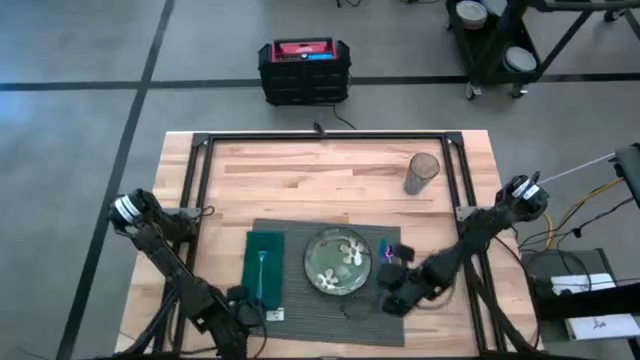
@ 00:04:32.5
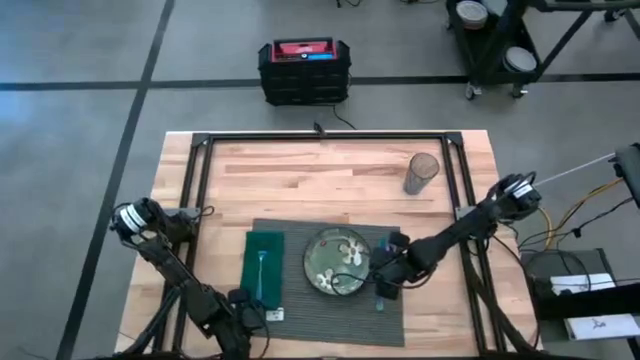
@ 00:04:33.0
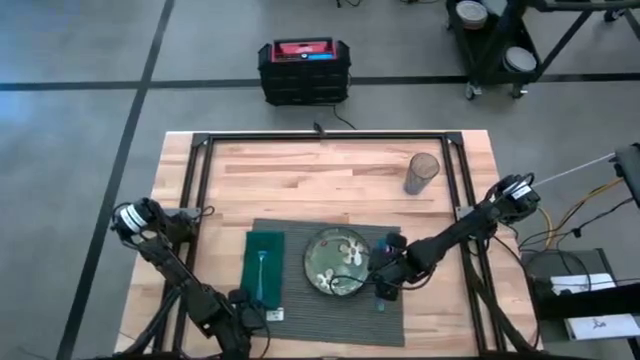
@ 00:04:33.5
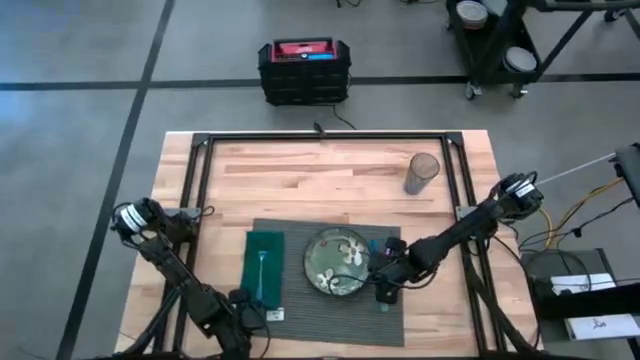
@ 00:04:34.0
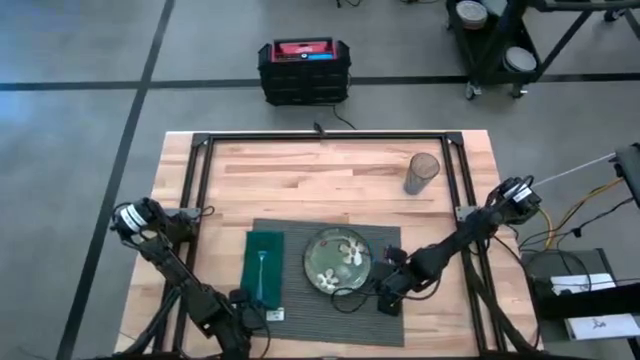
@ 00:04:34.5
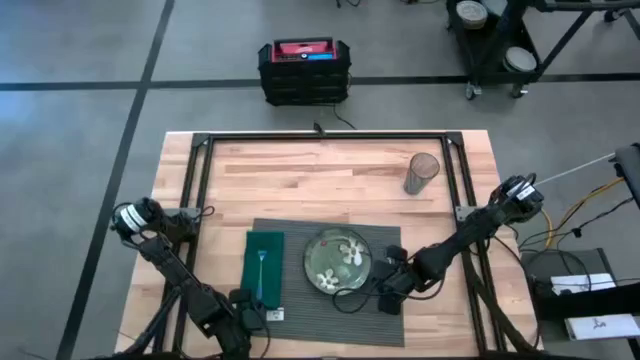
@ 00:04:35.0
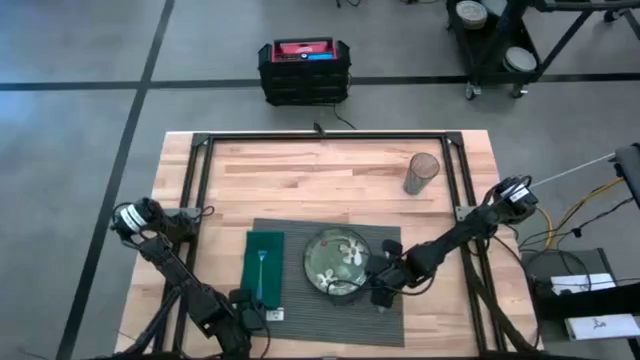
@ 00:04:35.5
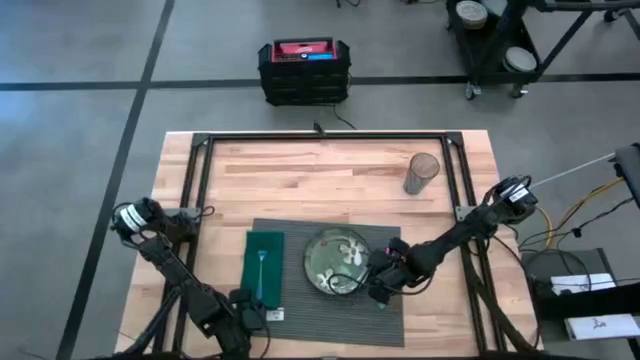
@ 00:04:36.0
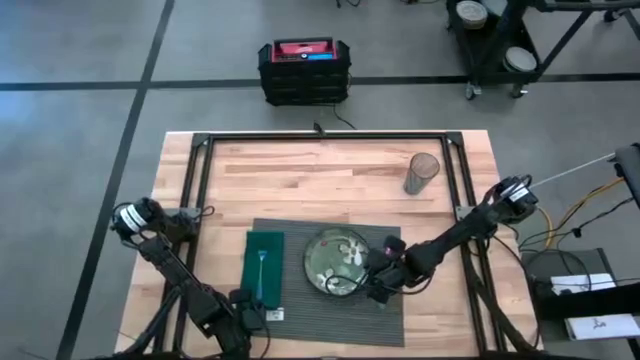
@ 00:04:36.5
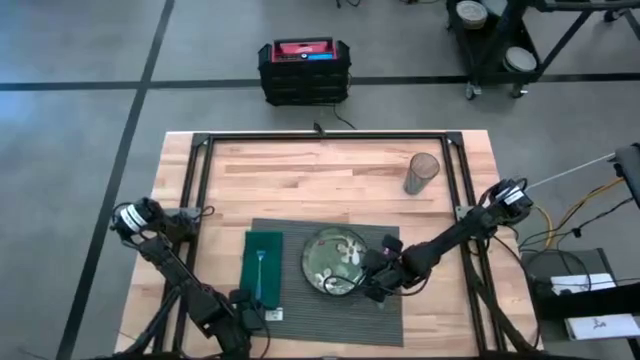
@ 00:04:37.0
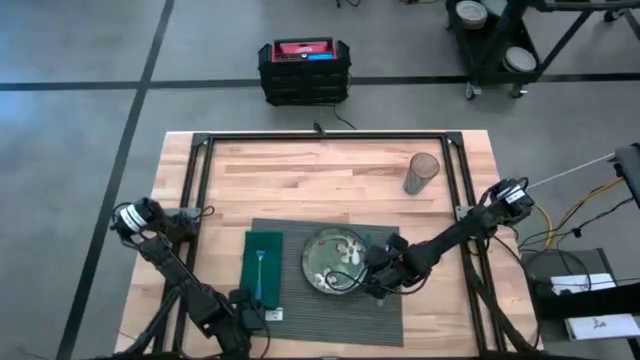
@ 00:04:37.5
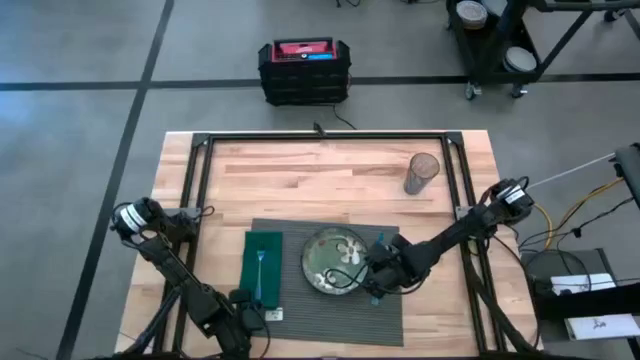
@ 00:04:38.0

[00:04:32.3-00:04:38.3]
Task: Set table place
Adjust the iridescent blue knife

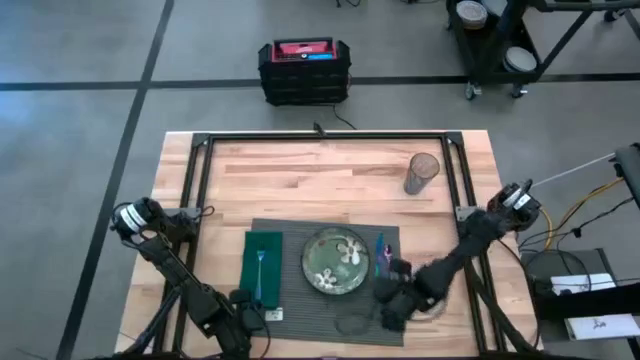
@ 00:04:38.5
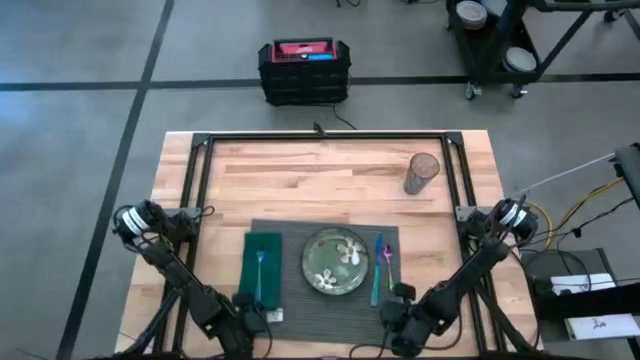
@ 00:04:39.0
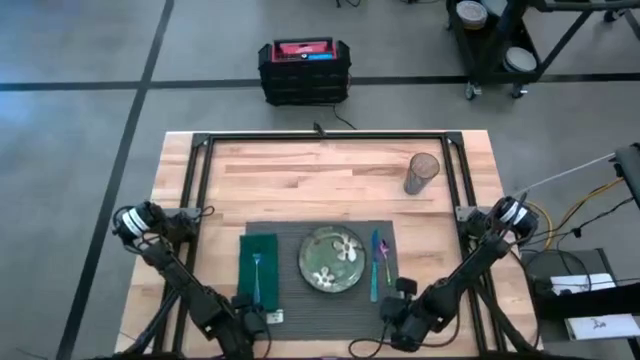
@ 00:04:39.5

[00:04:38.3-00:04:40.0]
Adjust the gray place mat

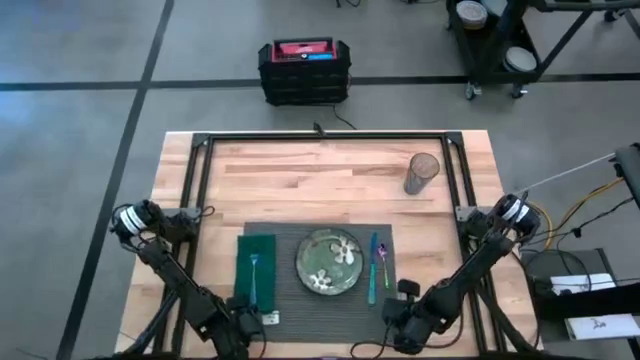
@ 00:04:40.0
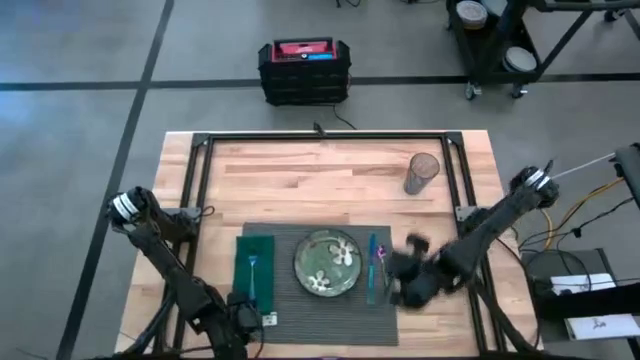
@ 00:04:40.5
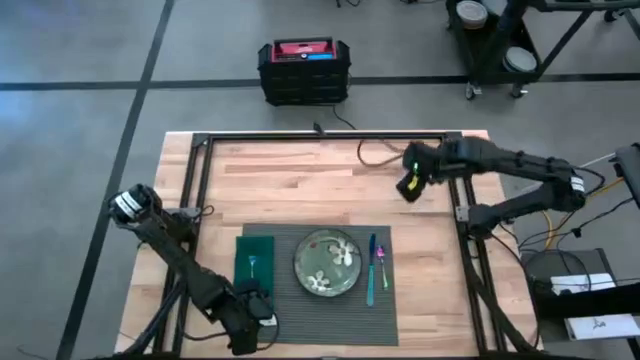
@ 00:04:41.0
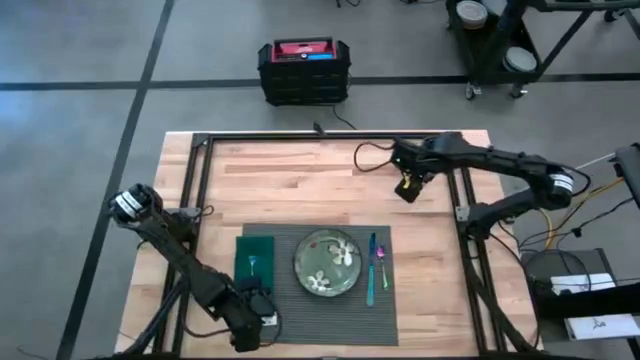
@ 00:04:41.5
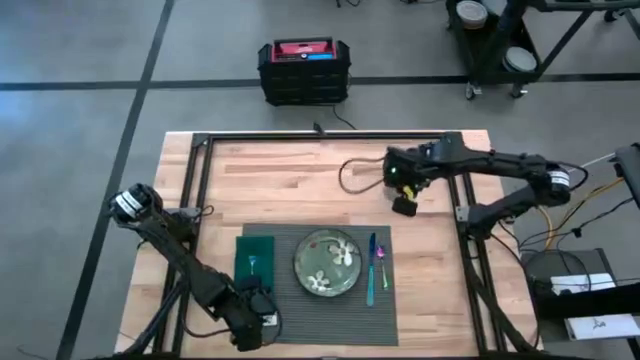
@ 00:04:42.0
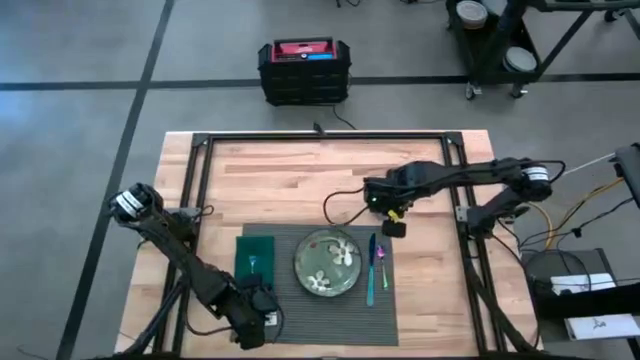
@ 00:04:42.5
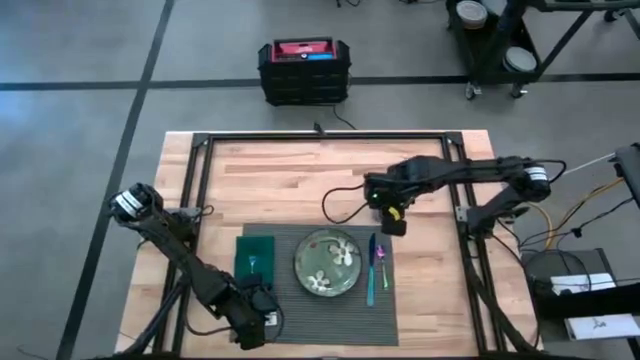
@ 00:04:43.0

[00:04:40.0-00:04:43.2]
Put the blue transparent cup above the place mat

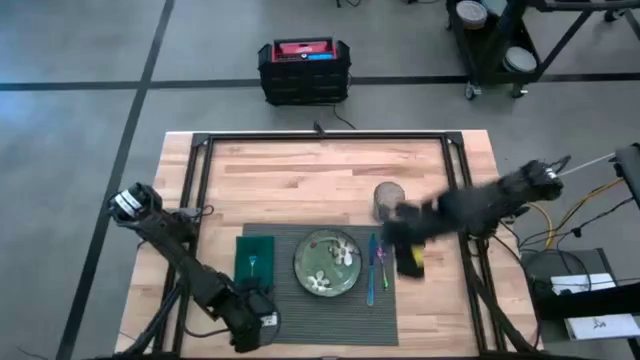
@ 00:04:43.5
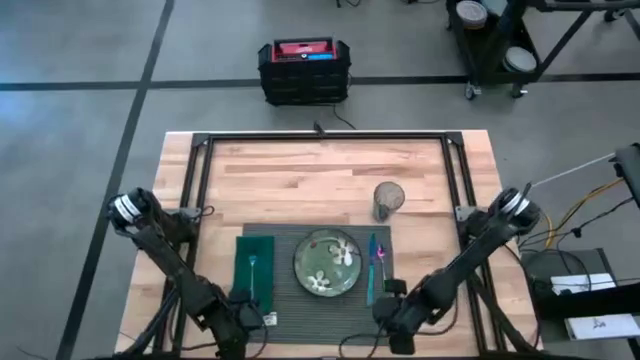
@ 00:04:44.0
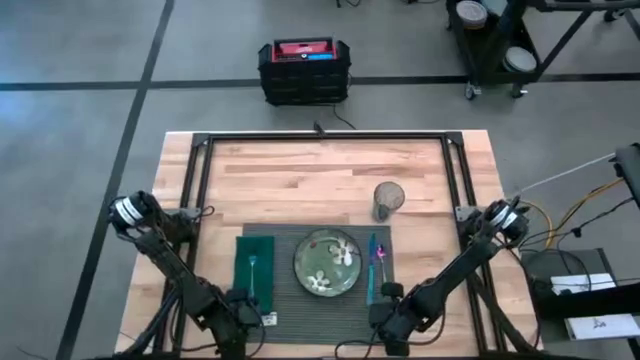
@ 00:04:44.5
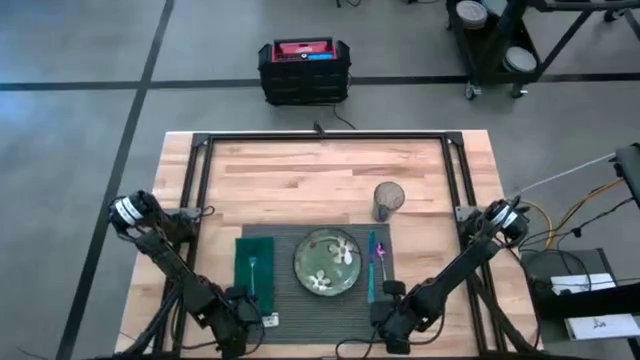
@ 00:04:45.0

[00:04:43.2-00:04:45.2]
Adjust the gray place mat

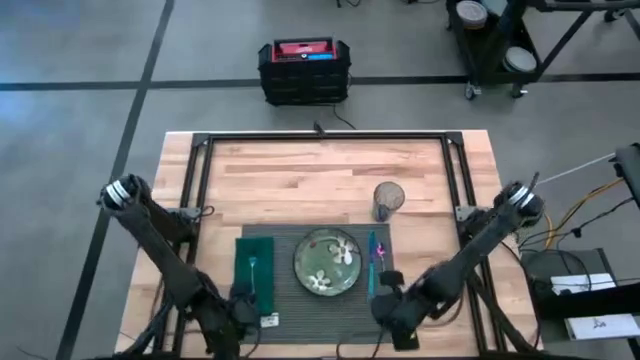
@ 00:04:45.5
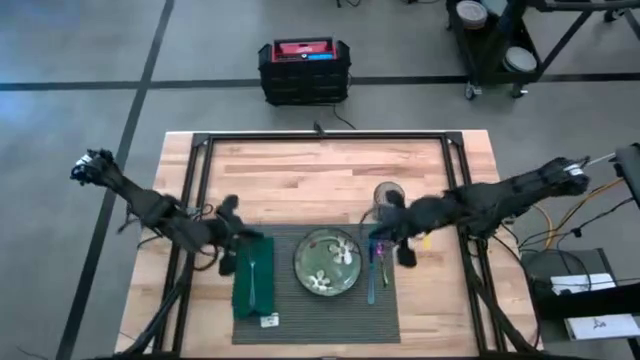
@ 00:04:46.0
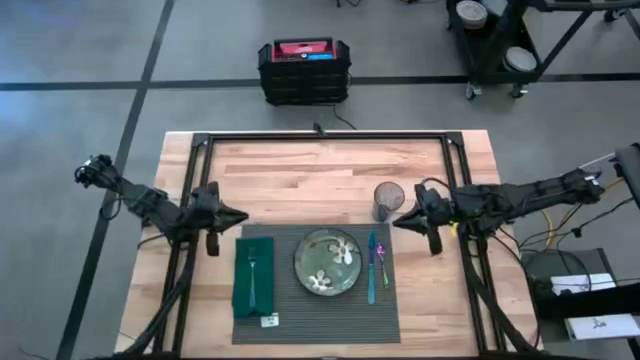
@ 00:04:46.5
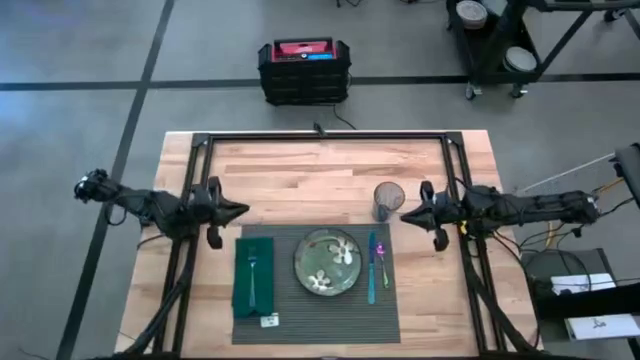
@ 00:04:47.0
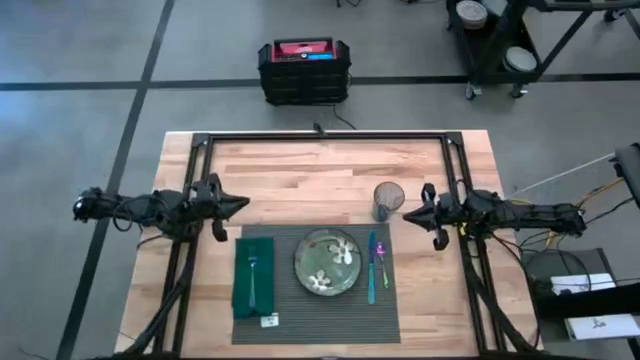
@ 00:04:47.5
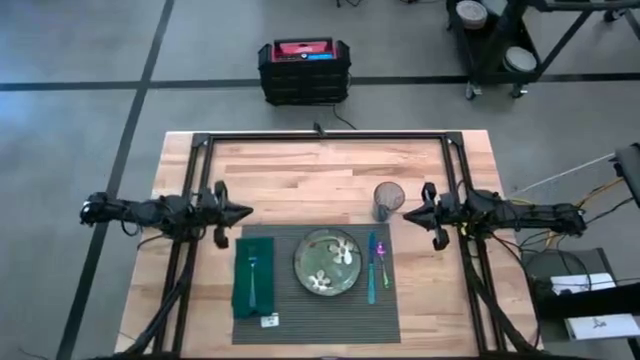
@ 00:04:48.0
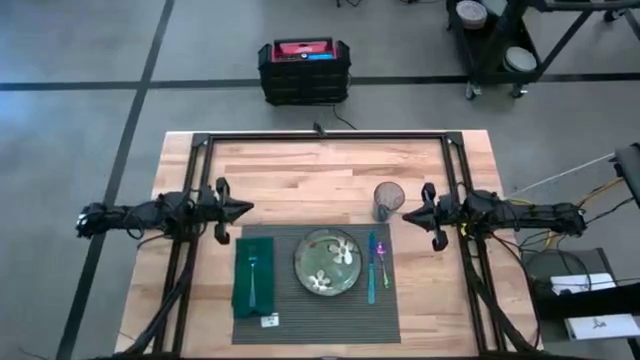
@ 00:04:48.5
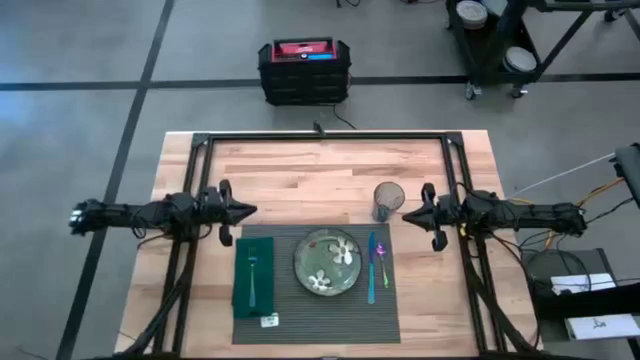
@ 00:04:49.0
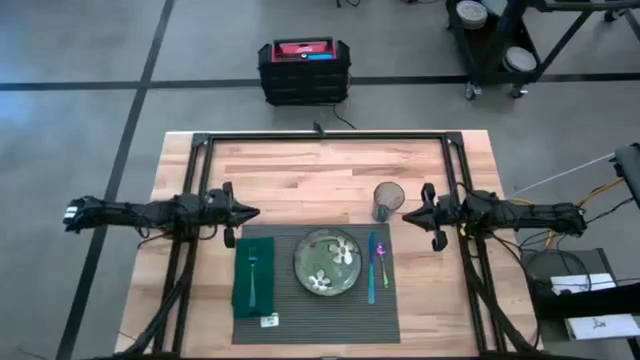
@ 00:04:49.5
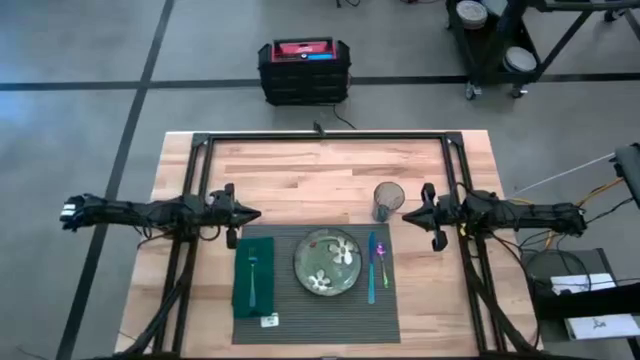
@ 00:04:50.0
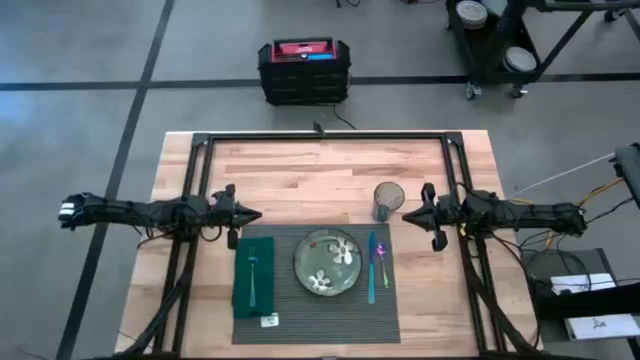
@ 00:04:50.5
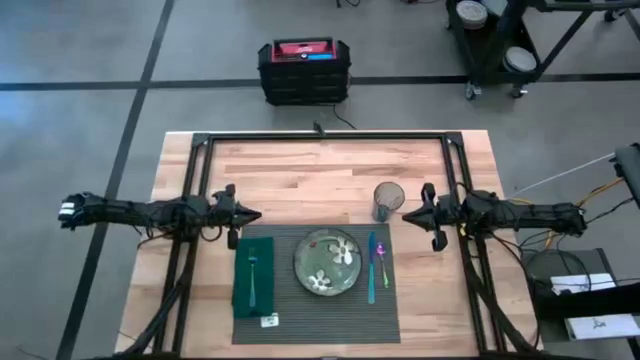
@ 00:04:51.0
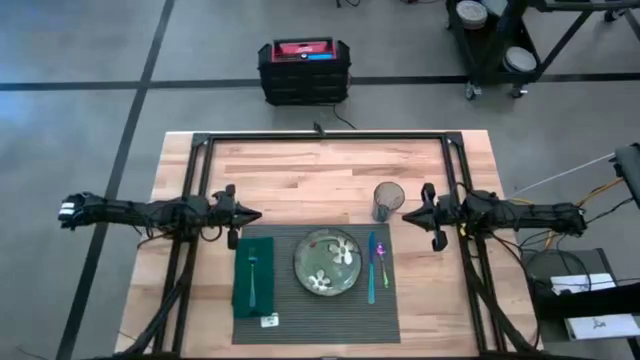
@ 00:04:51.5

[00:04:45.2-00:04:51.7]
Return to Home Position

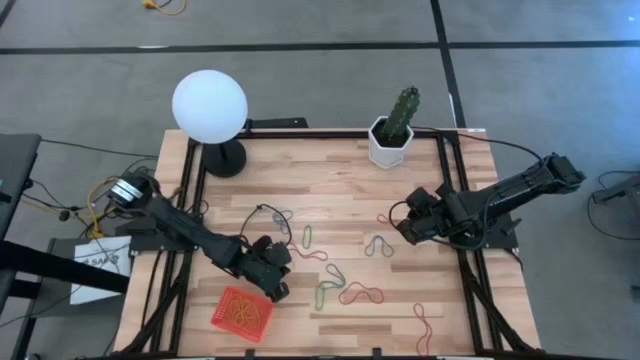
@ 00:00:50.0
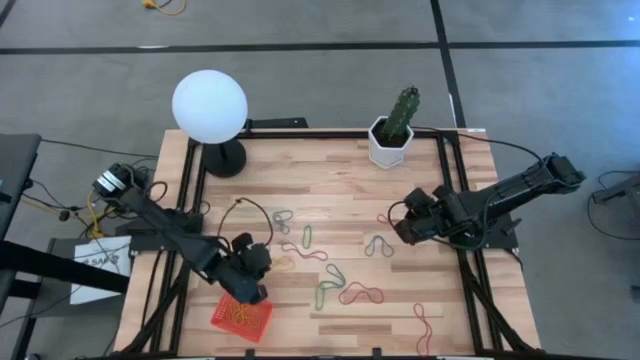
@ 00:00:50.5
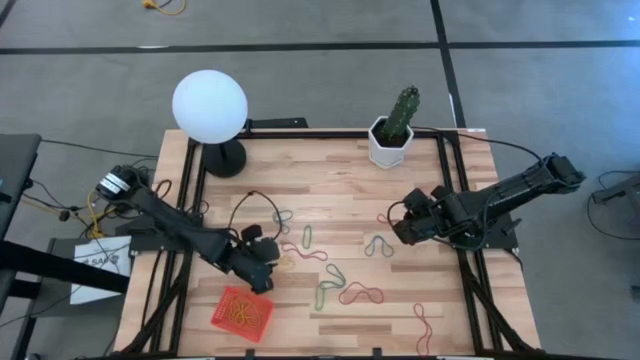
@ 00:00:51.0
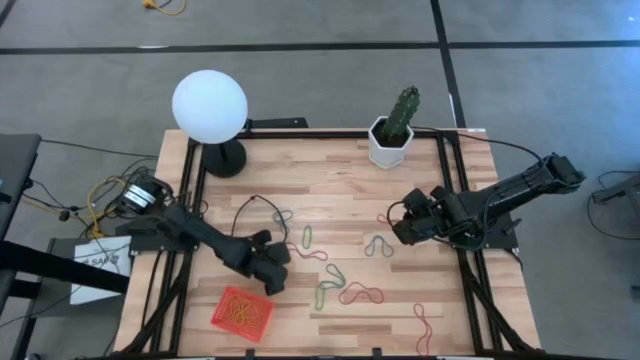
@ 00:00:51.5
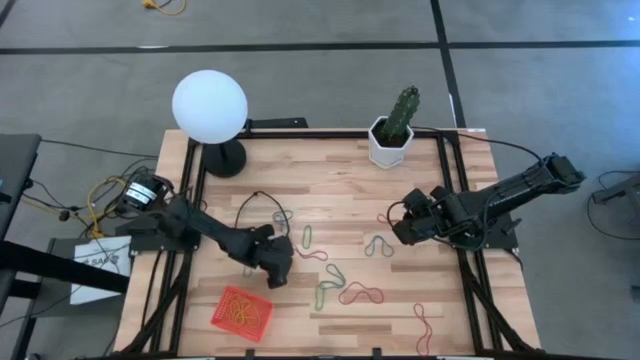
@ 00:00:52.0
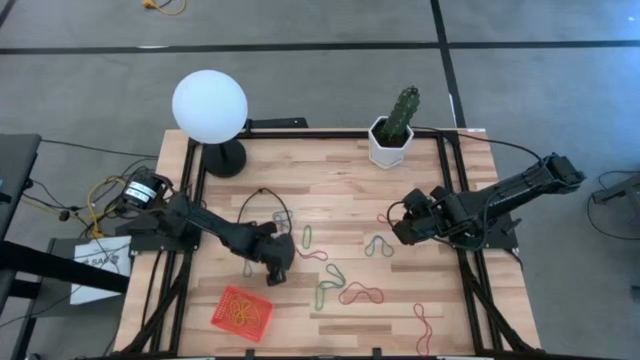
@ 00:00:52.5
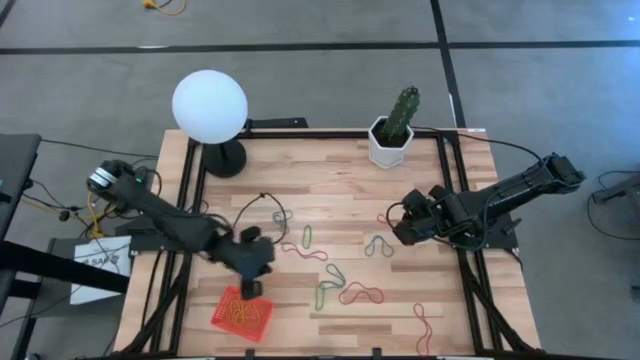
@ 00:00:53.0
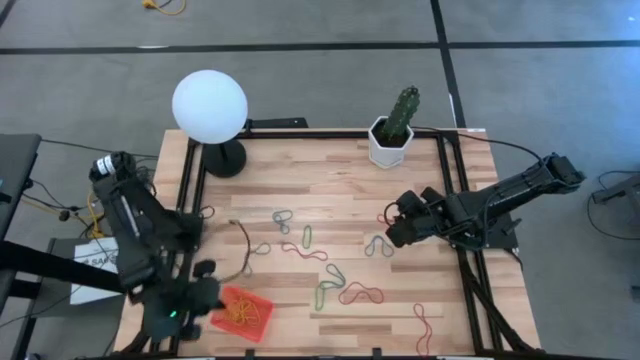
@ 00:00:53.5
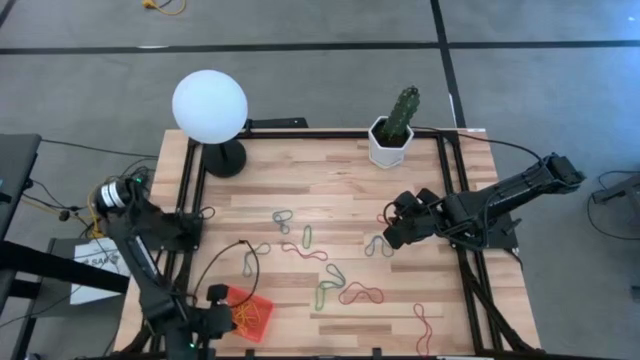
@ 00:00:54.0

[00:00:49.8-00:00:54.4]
Task: Pick and place rubber bands into bin
Put the yellow rubber band into the basket
